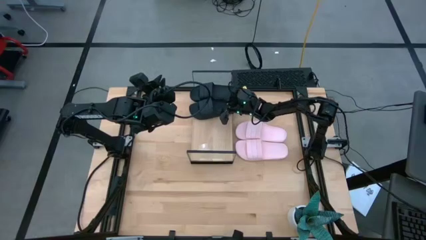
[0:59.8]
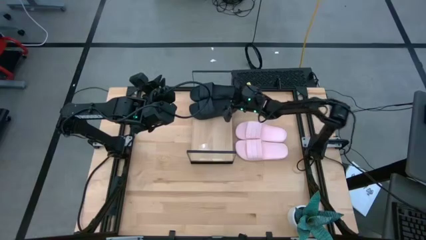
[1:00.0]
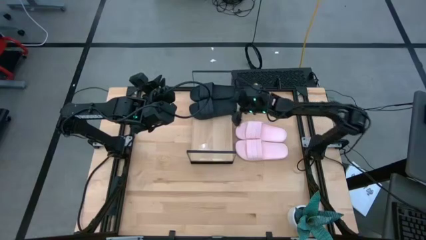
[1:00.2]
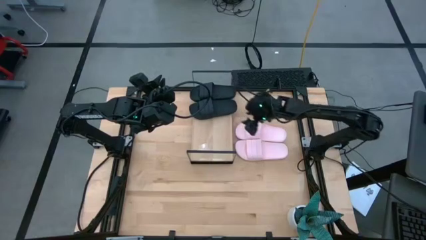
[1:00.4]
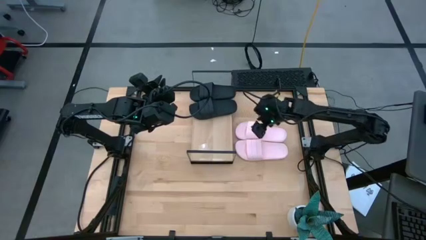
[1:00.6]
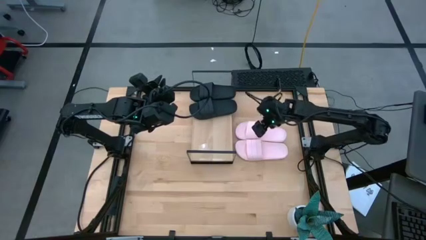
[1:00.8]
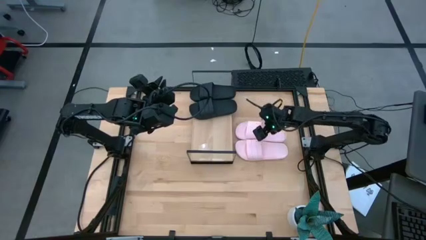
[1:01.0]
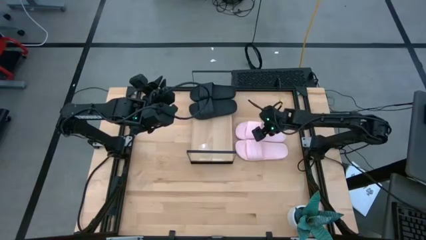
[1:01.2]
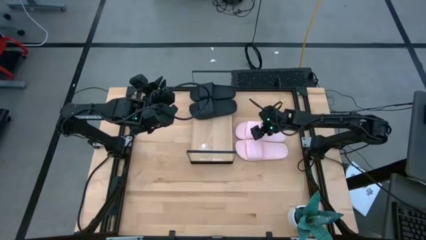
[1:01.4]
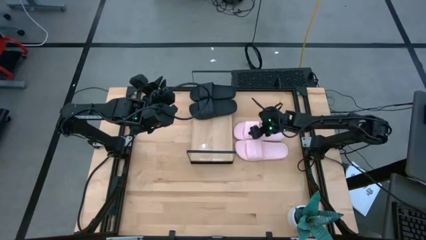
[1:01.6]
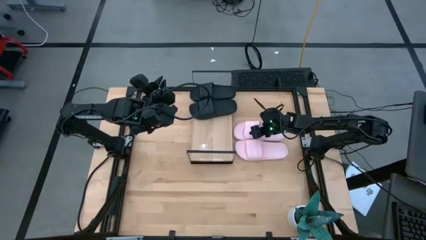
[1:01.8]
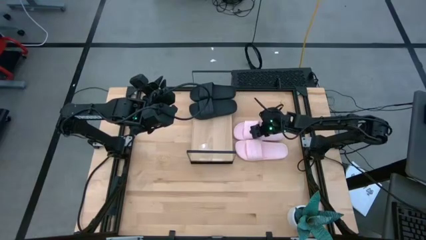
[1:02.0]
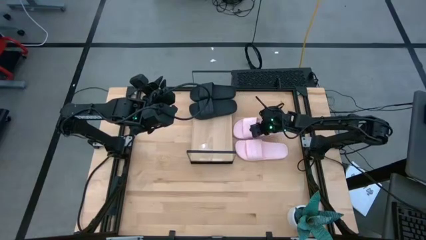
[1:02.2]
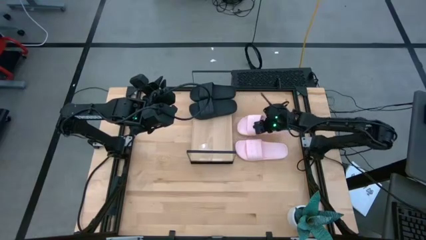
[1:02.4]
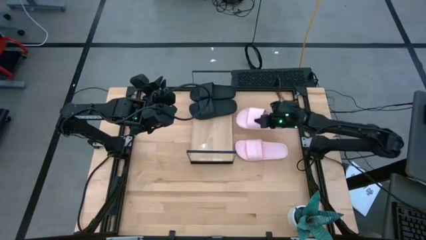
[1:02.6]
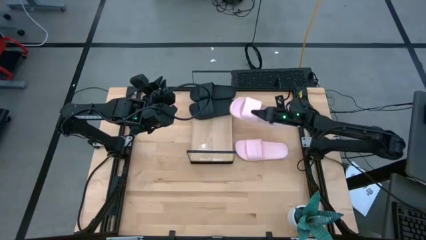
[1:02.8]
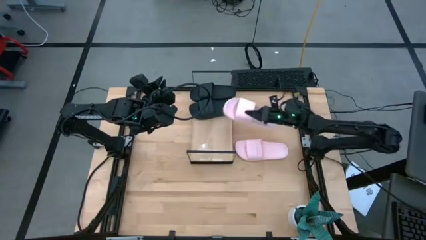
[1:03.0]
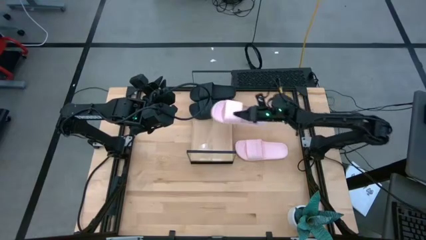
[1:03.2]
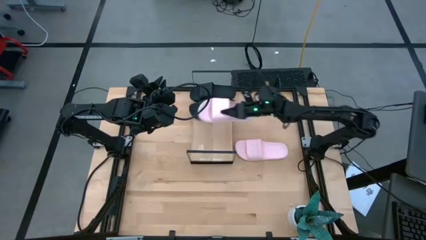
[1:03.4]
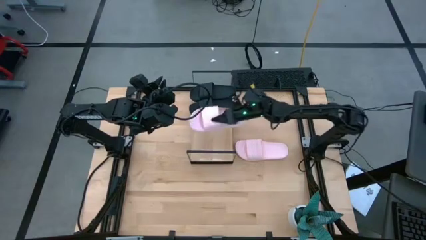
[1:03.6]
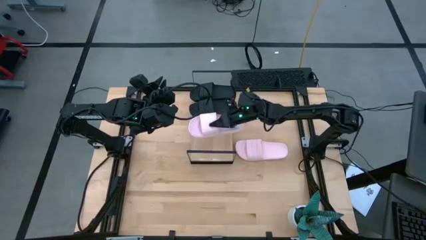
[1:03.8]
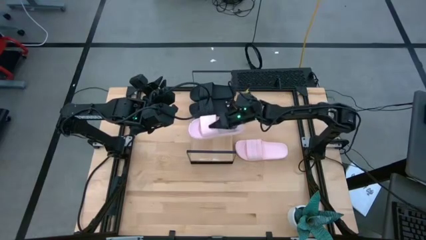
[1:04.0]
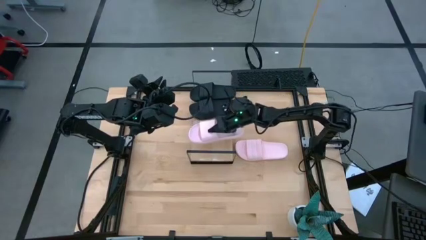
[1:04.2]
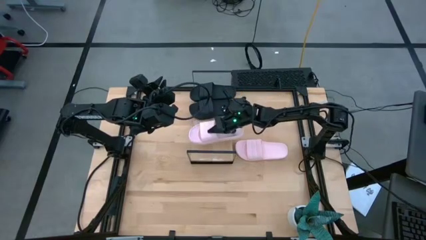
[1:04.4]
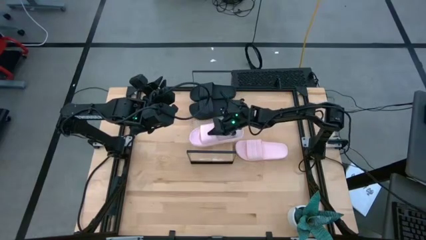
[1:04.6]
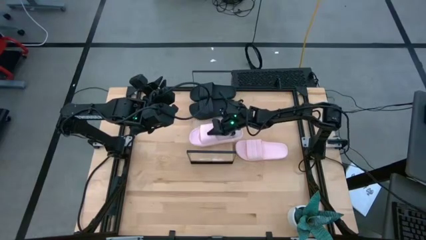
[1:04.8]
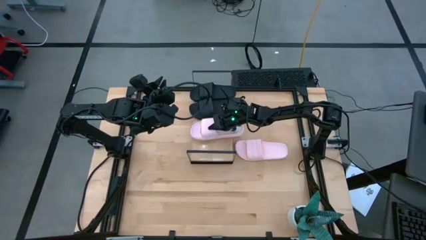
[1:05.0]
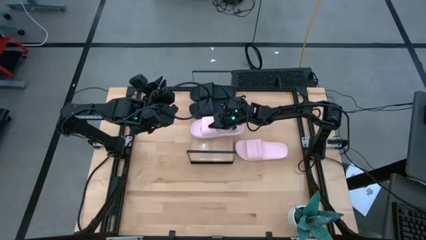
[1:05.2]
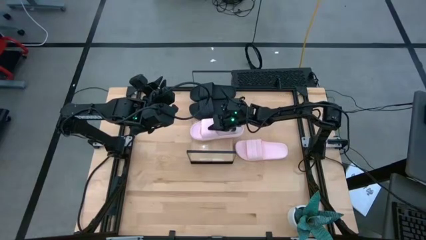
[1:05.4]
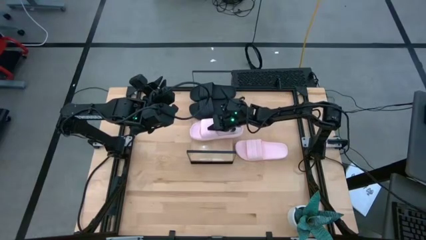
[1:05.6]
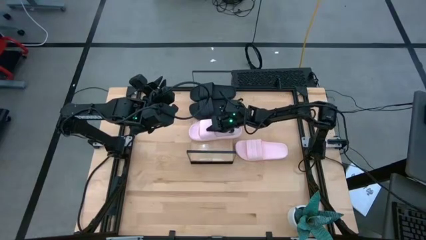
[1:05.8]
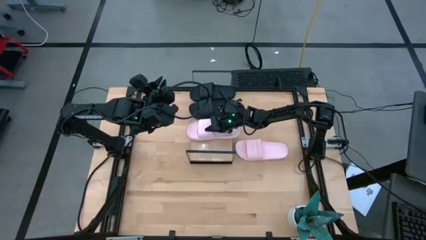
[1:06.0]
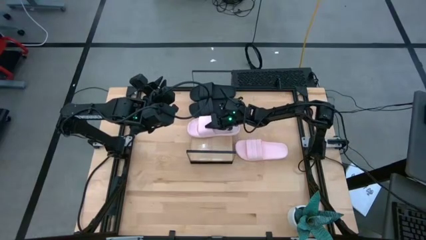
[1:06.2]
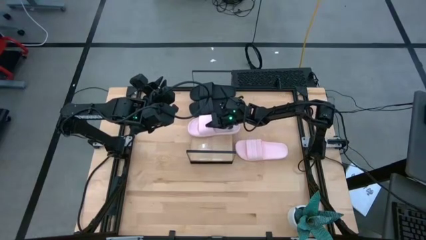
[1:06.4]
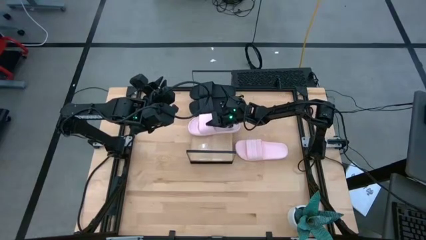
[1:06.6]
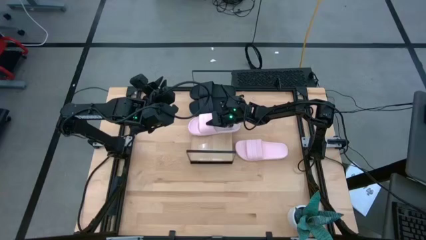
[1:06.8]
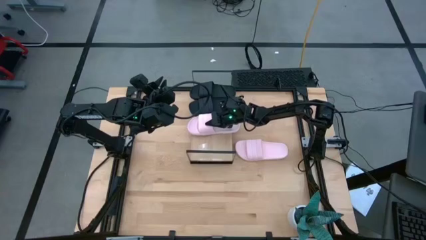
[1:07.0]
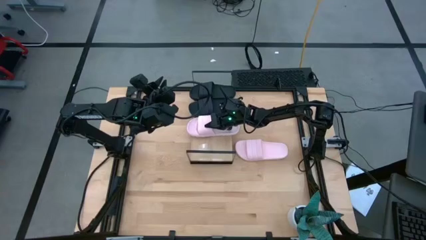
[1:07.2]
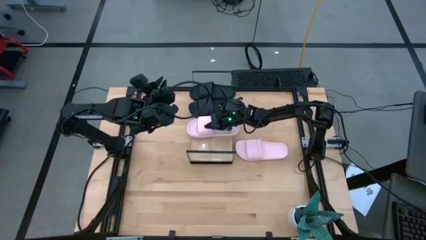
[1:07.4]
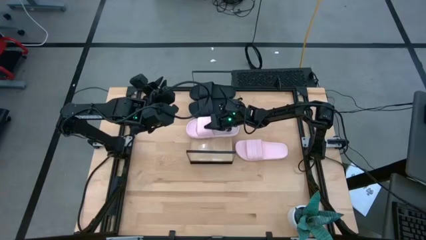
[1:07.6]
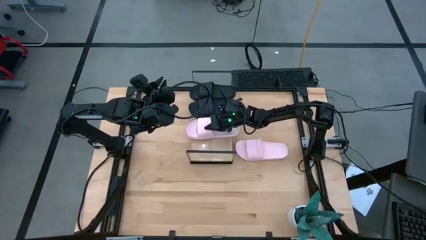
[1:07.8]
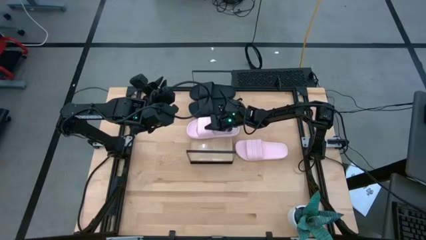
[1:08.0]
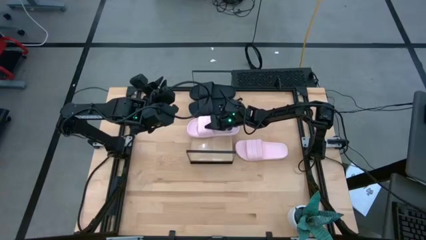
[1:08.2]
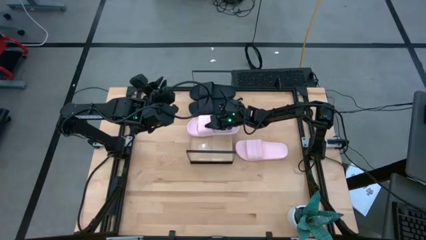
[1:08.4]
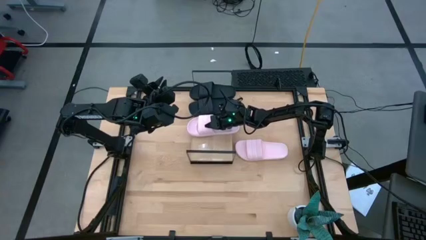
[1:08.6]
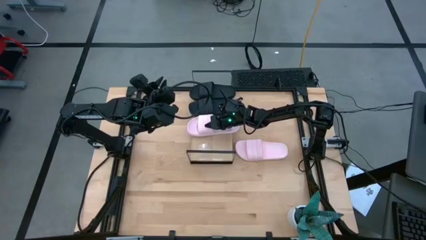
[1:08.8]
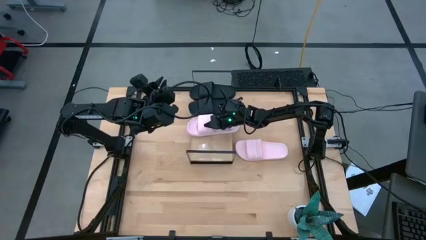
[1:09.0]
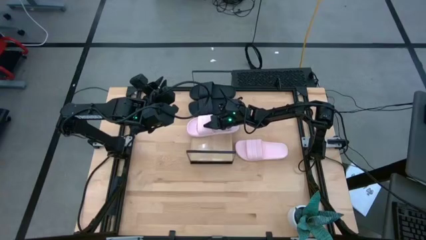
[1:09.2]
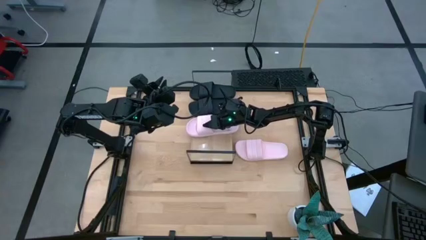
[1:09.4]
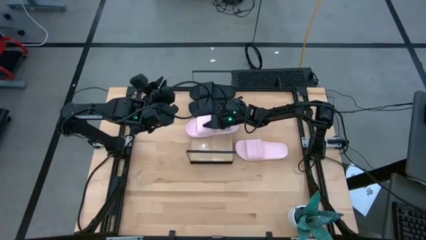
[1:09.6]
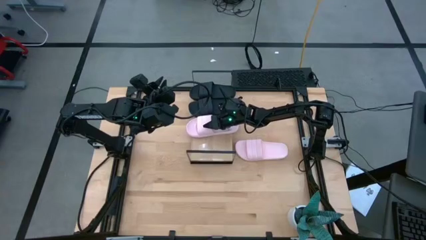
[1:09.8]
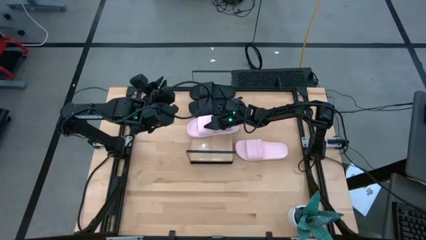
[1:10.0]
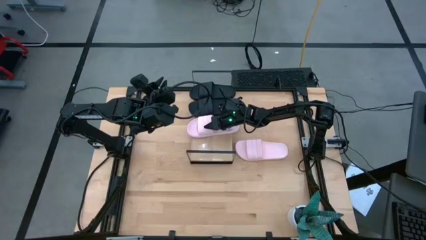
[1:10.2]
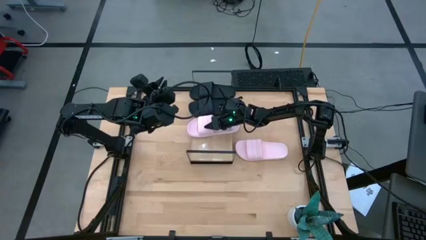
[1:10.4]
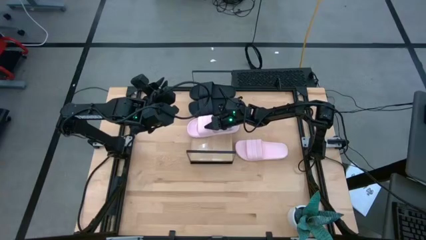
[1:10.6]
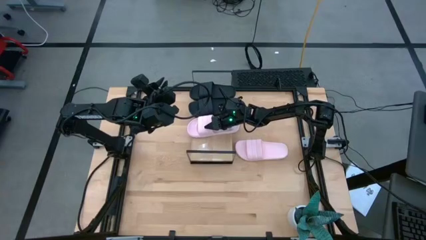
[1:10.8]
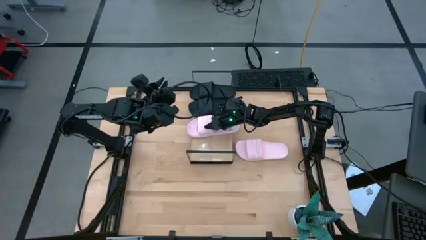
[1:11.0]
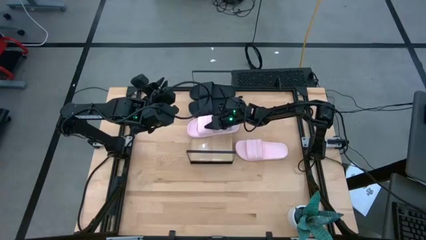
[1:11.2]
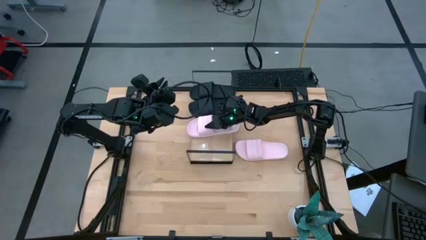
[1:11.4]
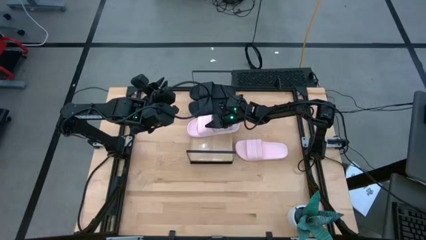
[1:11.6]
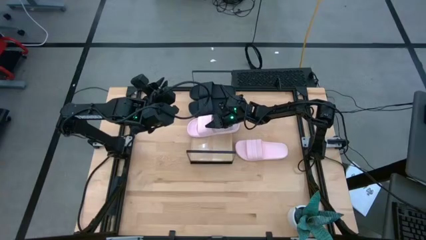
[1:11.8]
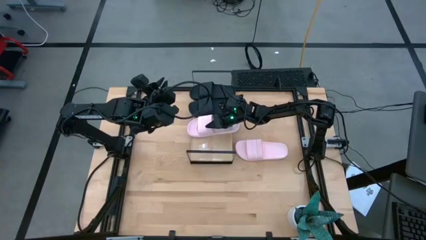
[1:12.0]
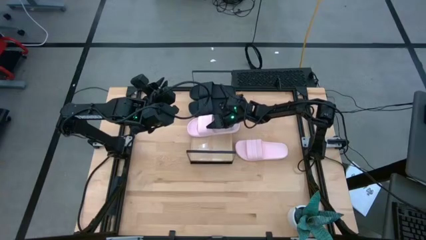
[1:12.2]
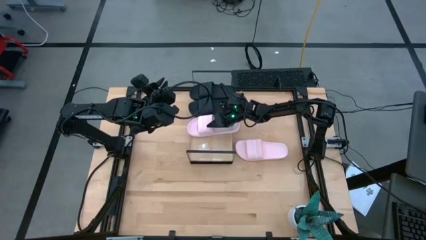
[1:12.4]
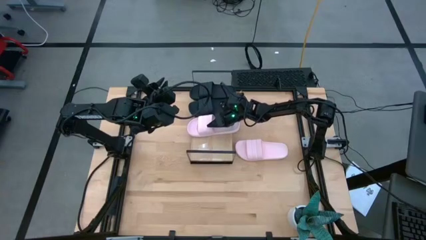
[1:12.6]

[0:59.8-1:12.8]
Task: Pick and place slides into the shelf
Put the top pink slide on the shelf
